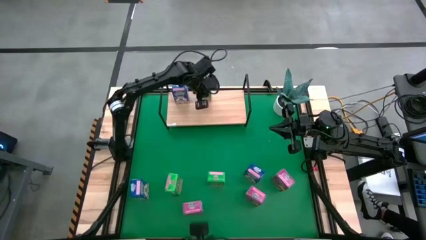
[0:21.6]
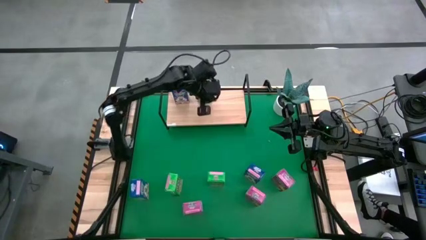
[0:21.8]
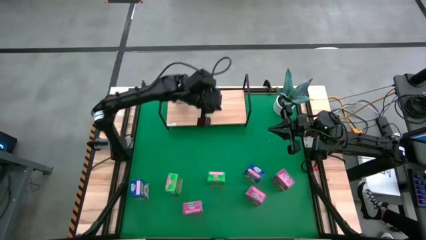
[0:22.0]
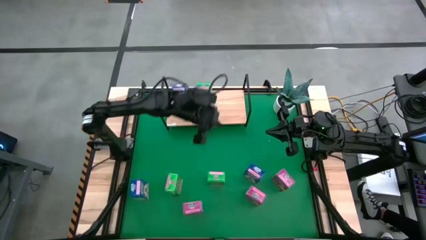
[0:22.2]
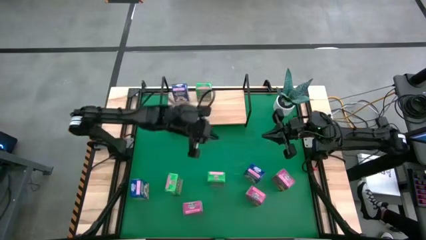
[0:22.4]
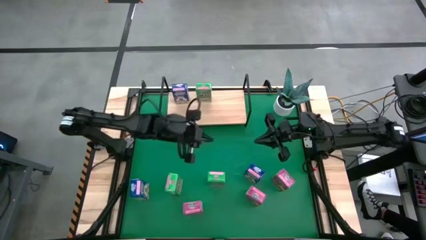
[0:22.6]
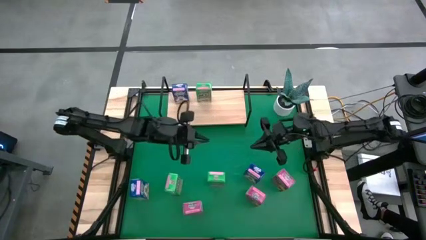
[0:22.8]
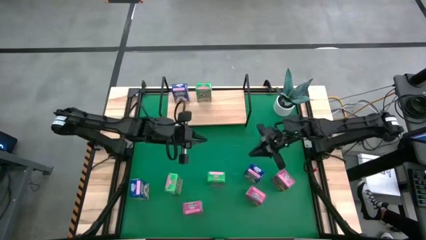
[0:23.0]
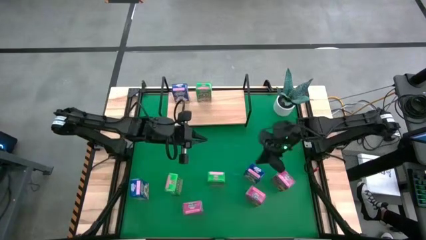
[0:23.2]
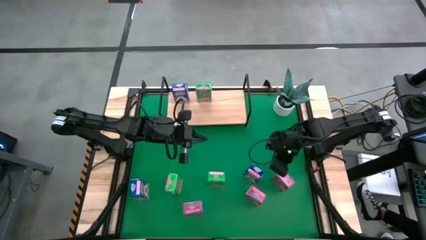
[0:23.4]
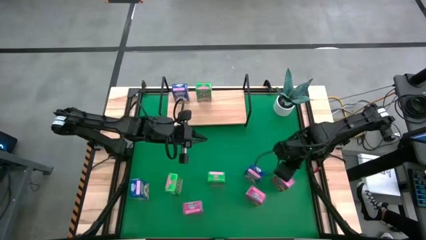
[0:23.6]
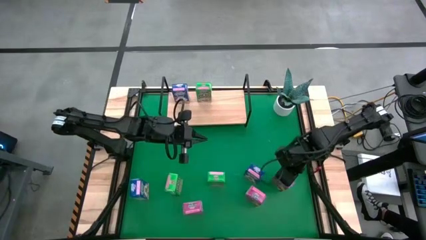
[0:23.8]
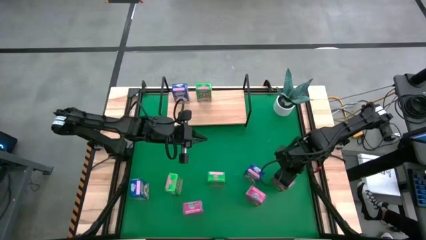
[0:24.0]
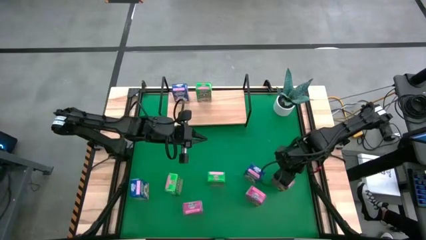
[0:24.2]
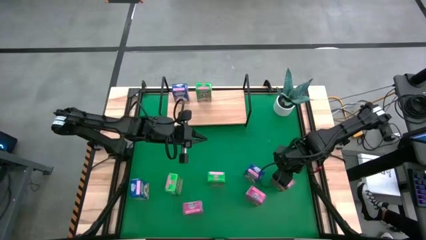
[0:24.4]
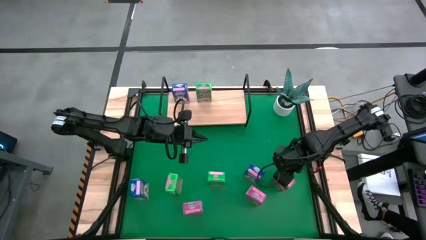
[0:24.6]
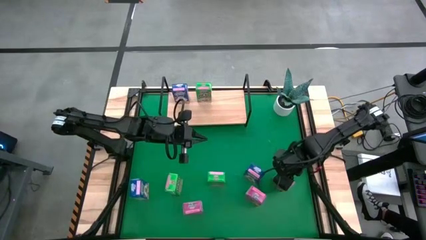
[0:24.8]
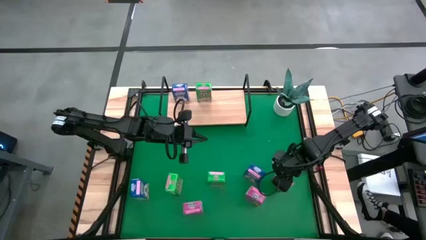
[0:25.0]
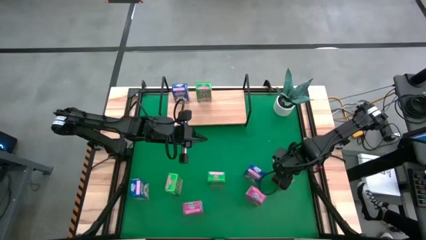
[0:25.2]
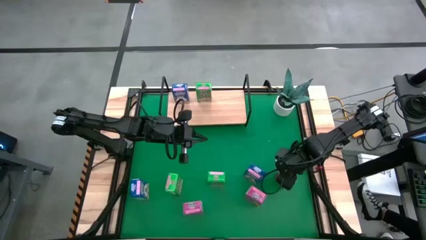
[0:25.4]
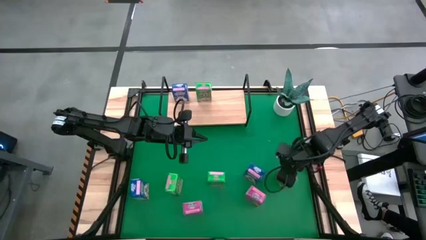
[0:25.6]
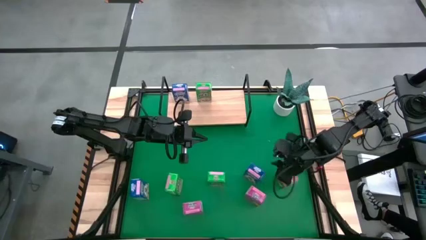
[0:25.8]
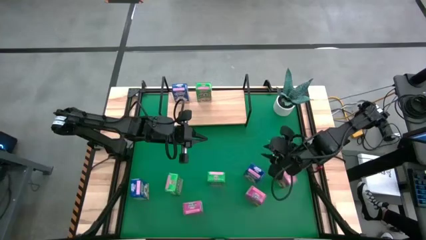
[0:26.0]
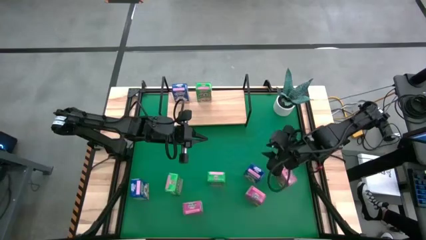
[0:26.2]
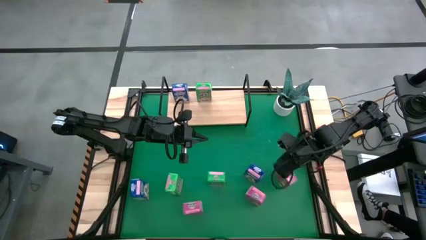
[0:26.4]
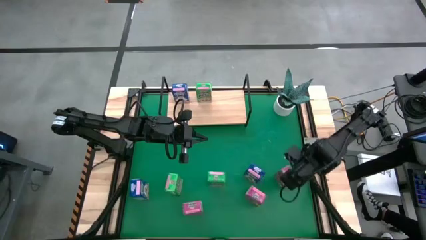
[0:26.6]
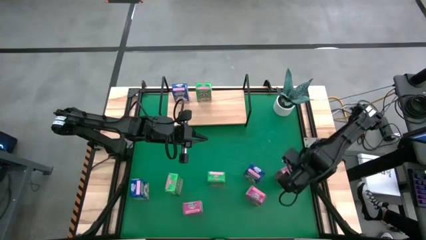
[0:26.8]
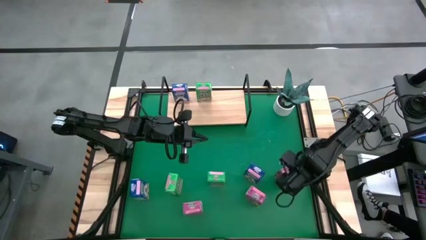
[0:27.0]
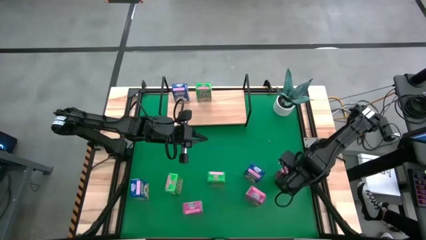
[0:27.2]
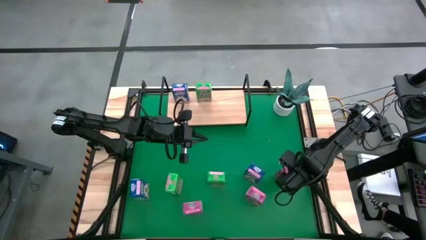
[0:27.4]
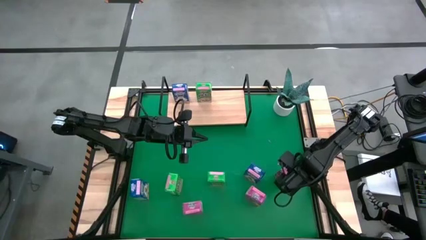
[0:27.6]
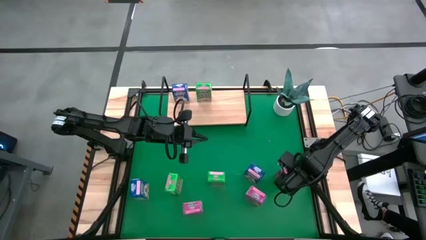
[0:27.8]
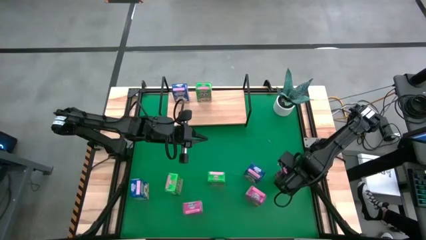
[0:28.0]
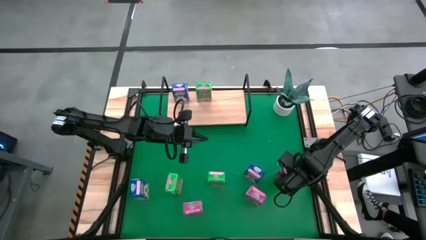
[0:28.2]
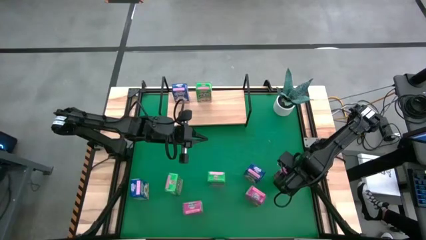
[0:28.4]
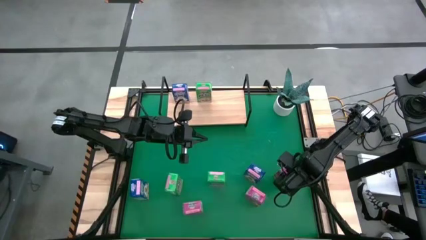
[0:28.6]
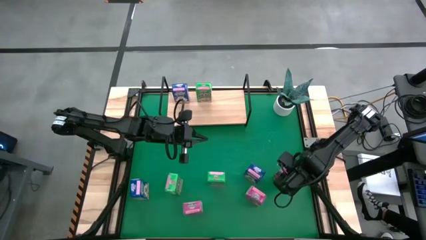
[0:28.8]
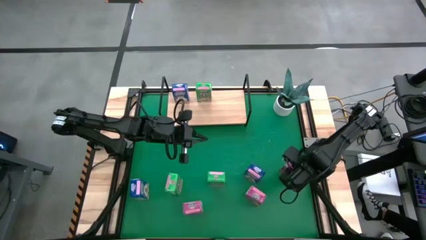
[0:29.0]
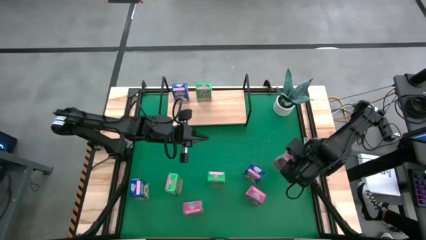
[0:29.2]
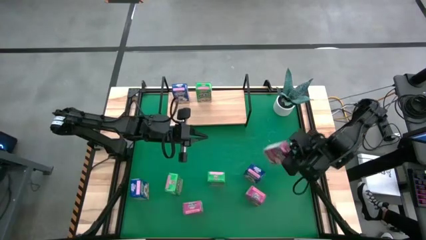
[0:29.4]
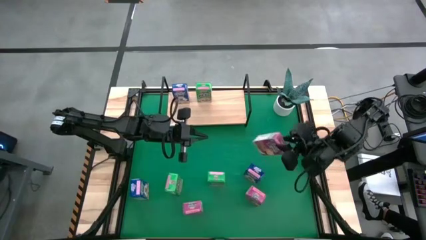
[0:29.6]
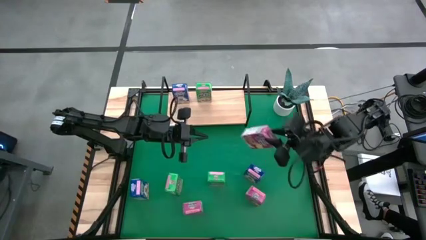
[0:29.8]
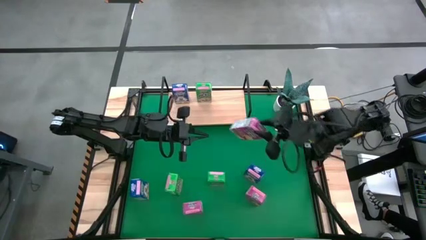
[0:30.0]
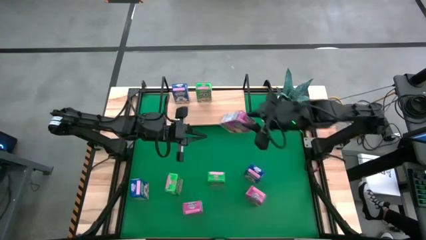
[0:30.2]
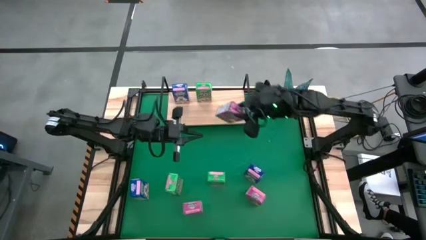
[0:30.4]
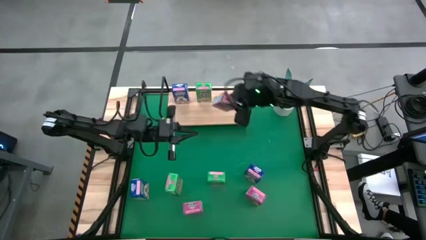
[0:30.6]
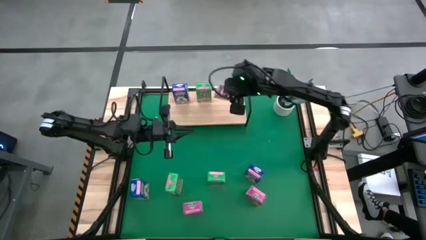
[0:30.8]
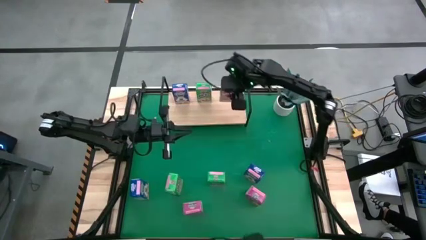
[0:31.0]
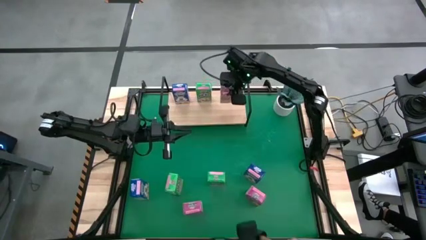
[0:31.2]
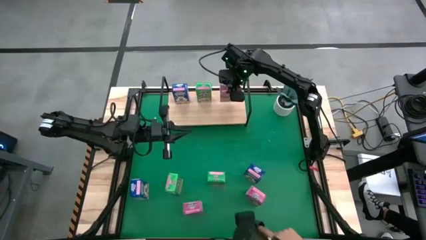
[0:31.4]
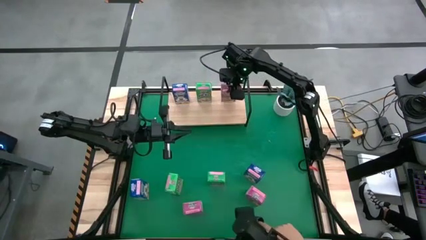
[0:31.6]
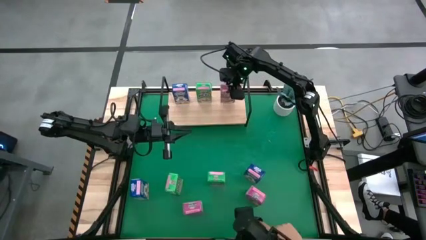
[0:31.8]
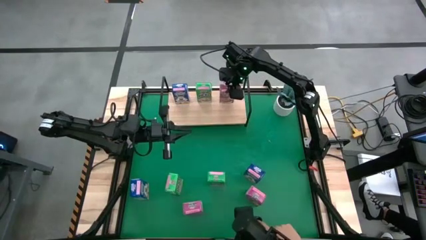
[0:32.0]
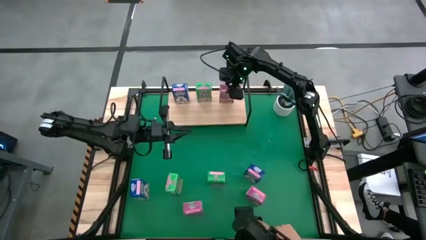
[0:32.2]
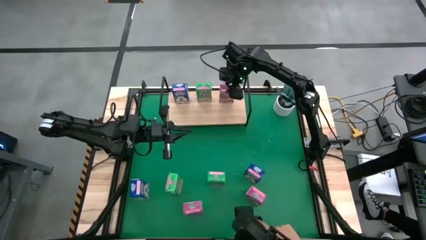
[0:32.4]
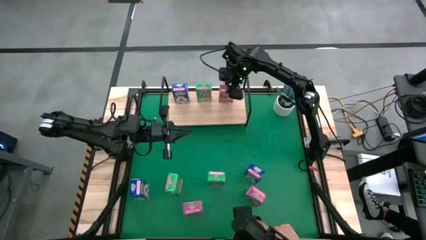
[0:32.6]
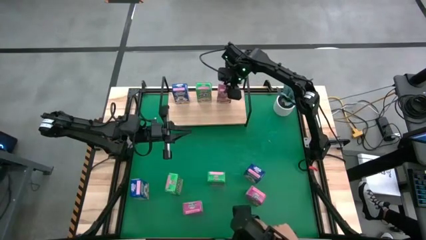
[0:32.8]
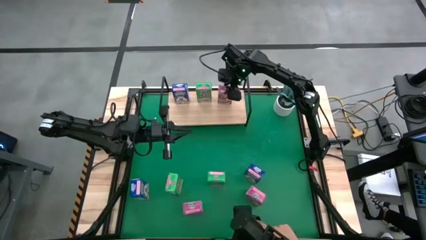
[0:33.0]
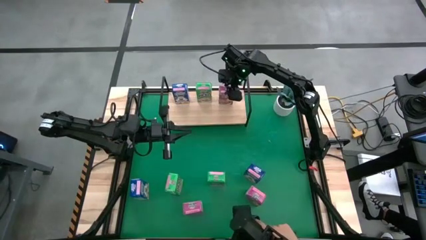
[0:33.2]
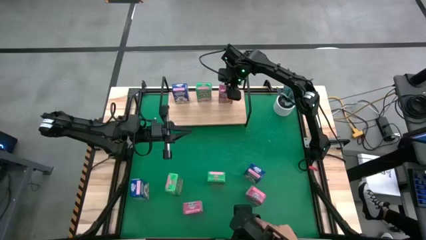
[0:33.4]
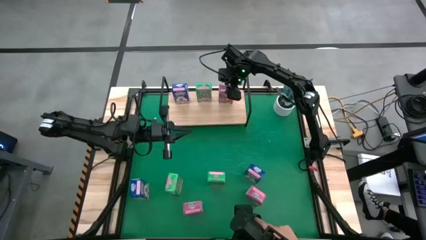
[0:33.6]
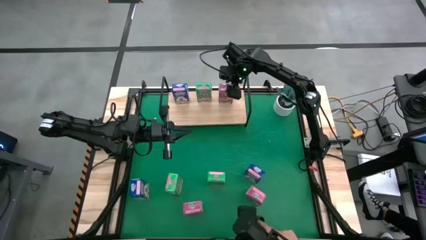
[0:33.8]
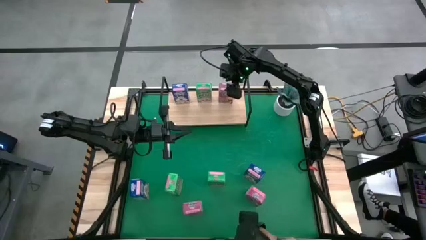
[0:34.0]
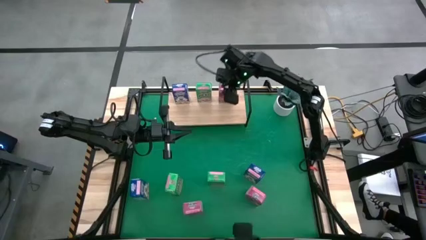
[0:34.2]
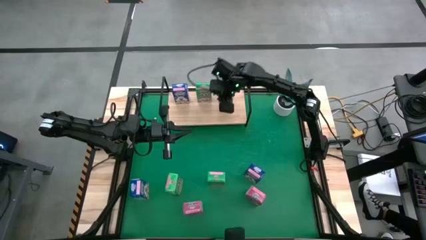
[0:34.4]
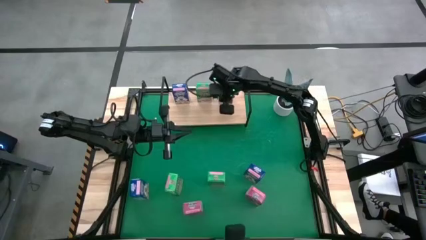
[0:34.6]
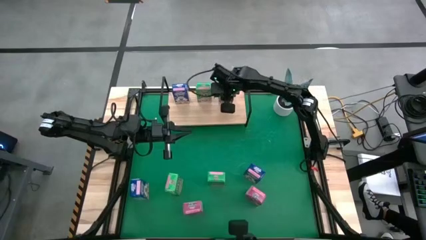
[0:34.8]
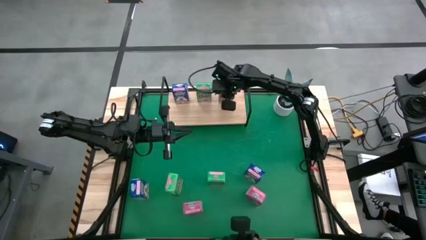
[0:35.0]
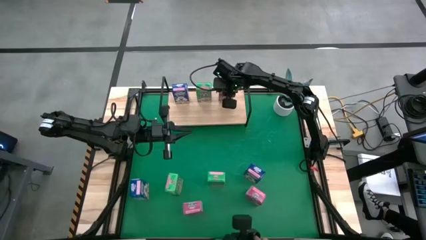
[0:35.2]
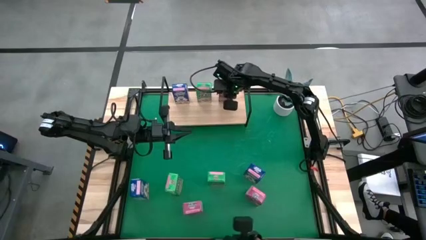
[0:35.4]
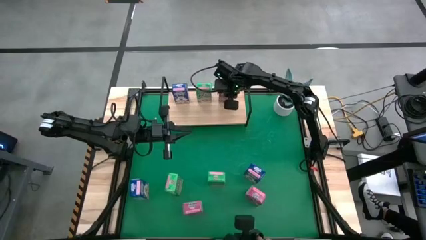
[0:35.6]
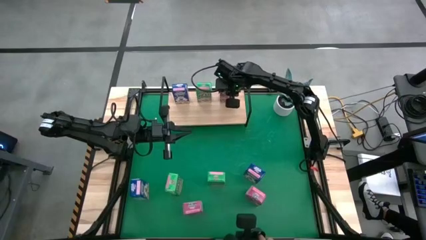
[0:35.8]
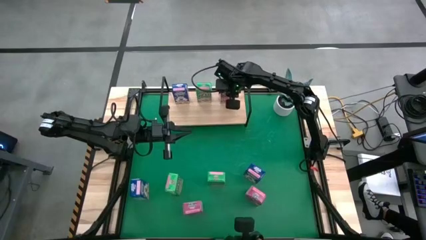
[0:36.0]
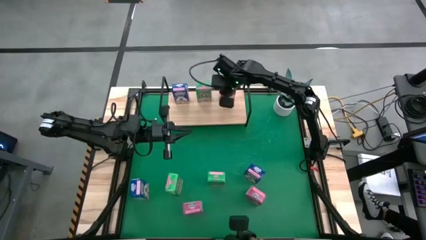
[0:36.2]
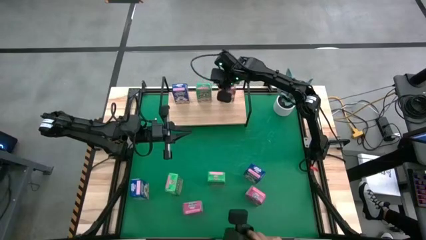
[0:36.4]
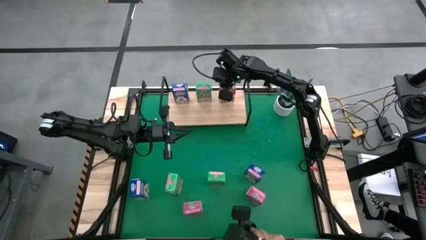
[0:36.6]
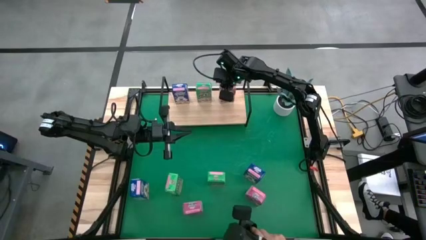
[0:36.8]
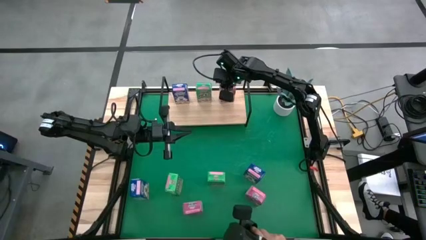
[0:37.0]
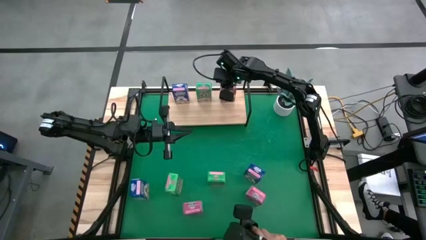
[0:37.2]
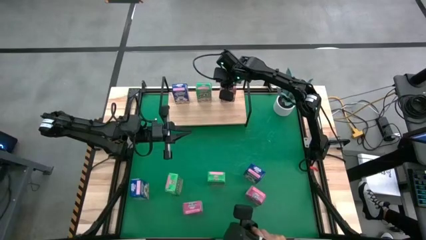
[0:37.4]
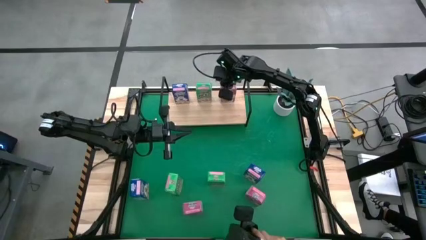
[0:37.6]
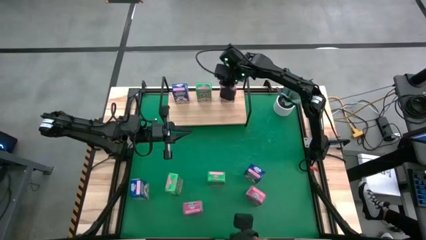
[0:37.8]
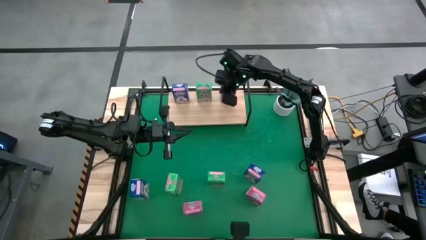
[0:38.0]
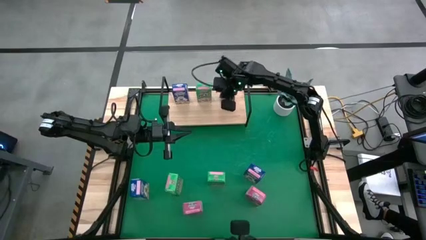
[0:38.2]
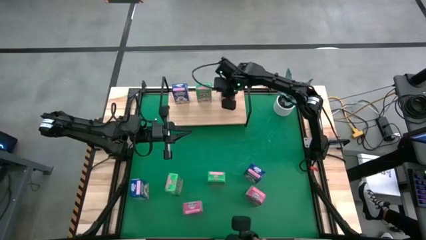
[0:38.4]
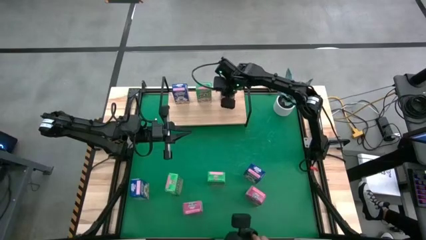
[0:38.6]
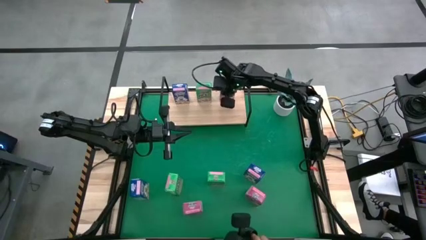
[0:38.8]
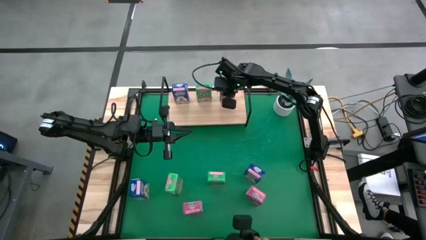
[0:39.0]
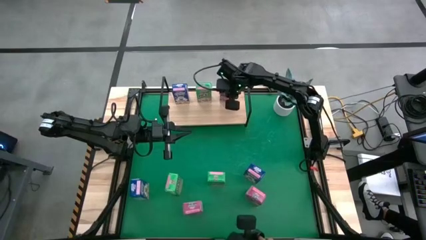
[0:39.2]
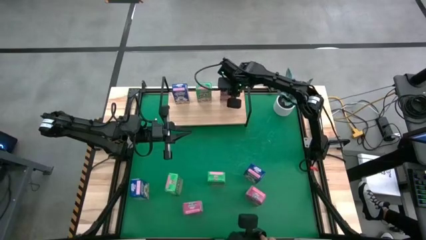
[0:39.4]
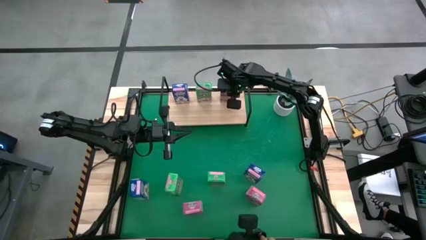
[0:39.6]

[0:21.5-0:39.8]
Task: Stack cereal on shelf
Put the right pink cereal box on the shelf
